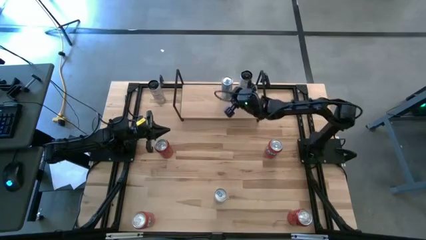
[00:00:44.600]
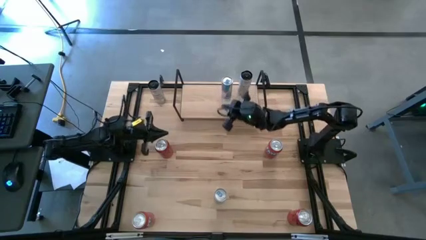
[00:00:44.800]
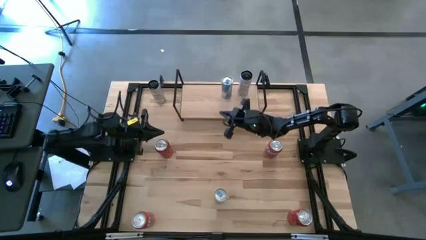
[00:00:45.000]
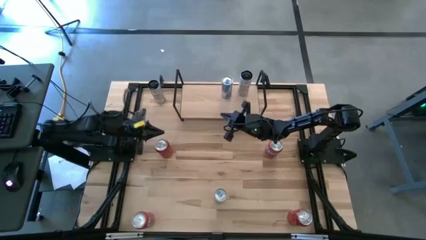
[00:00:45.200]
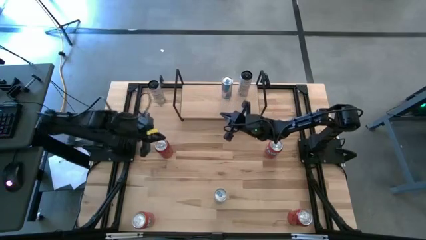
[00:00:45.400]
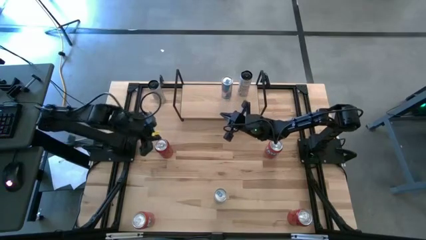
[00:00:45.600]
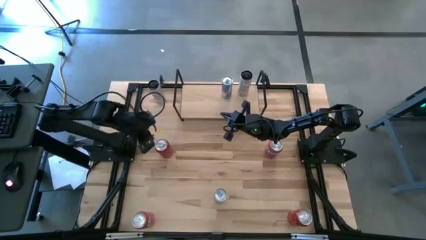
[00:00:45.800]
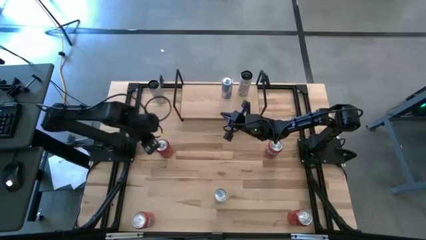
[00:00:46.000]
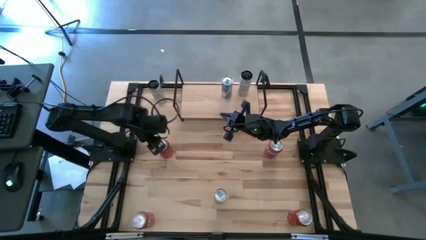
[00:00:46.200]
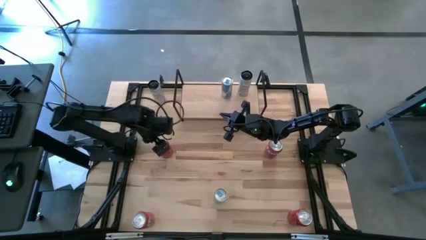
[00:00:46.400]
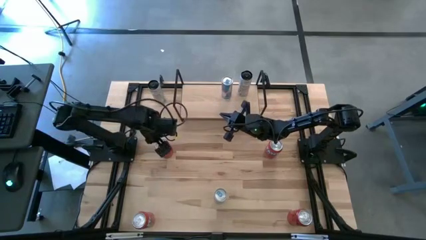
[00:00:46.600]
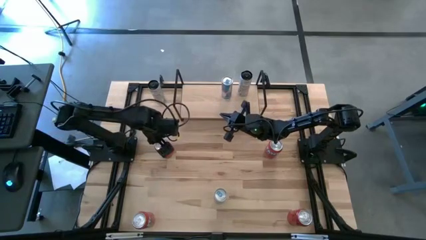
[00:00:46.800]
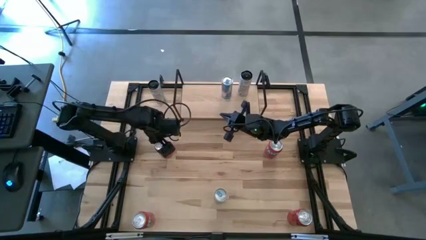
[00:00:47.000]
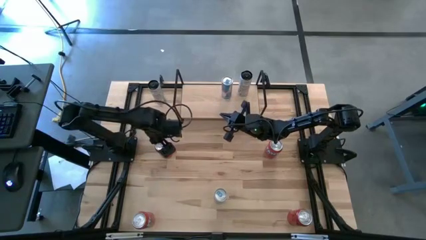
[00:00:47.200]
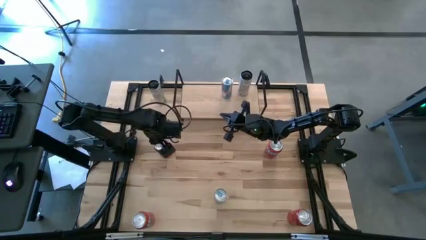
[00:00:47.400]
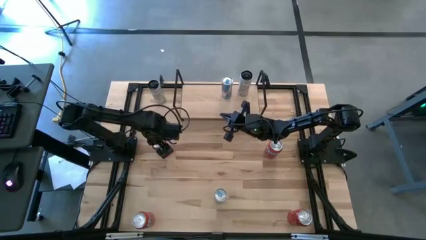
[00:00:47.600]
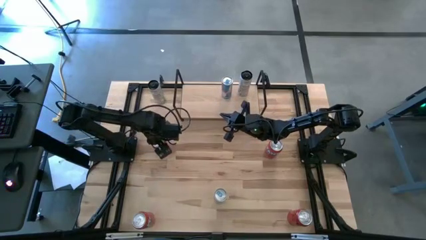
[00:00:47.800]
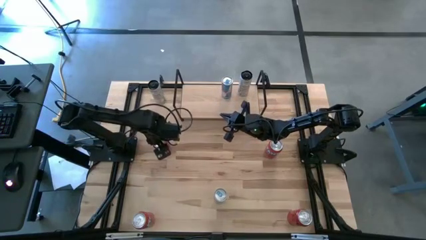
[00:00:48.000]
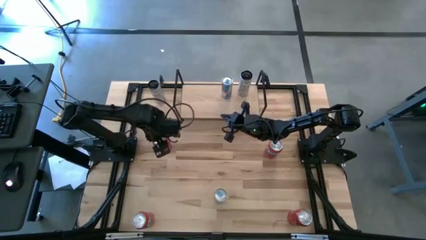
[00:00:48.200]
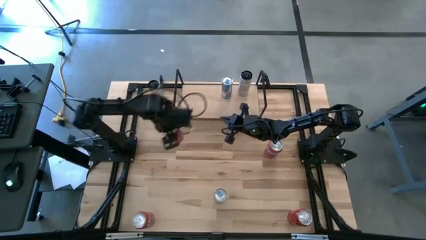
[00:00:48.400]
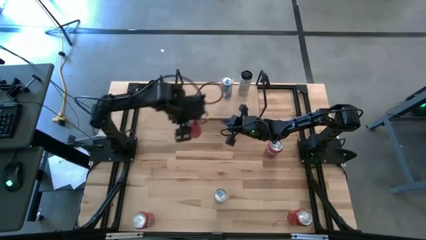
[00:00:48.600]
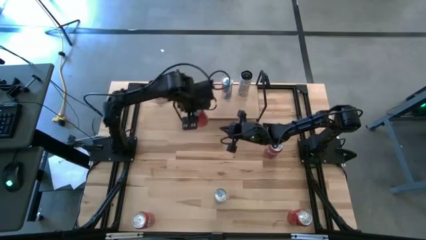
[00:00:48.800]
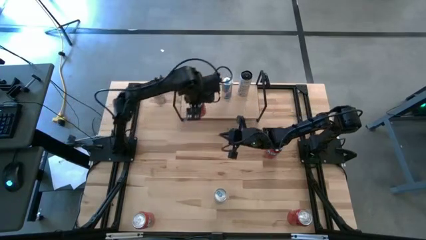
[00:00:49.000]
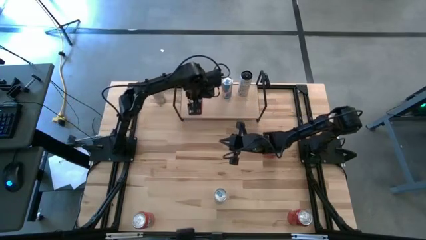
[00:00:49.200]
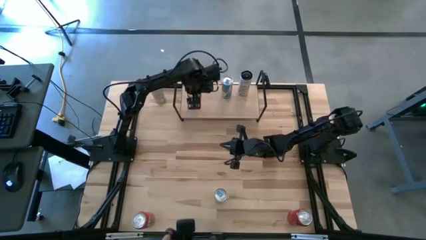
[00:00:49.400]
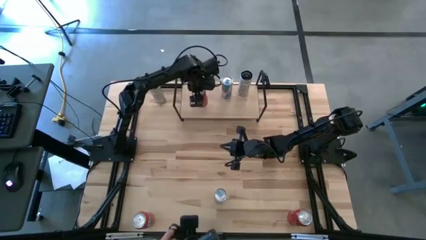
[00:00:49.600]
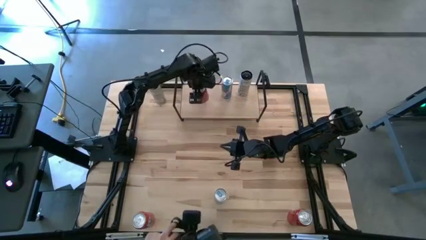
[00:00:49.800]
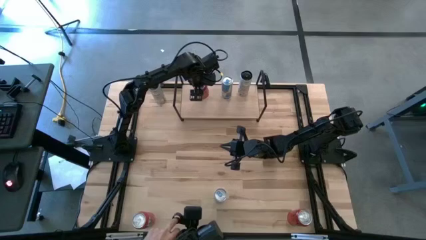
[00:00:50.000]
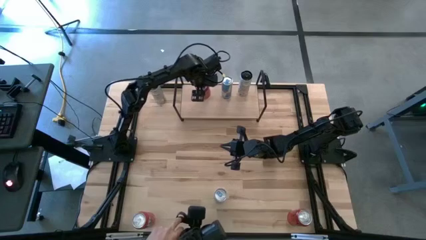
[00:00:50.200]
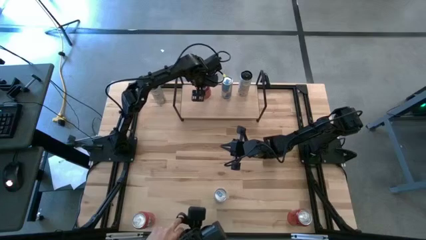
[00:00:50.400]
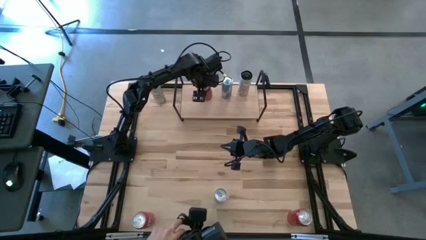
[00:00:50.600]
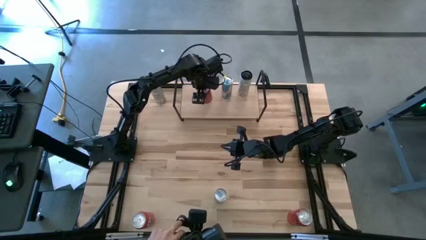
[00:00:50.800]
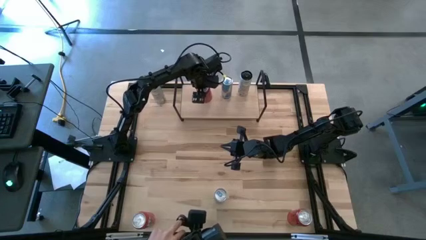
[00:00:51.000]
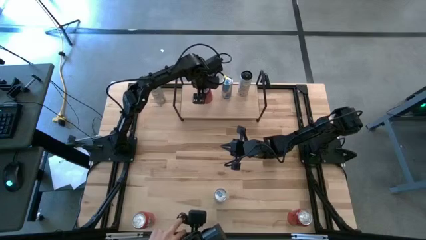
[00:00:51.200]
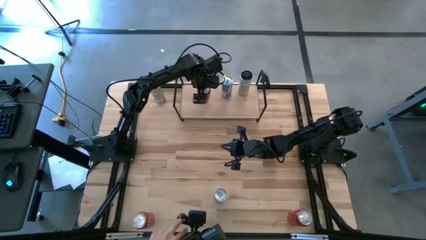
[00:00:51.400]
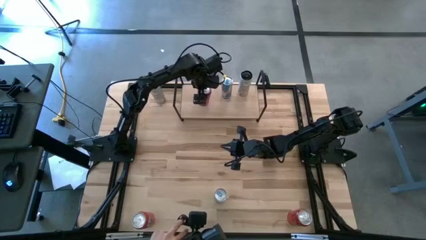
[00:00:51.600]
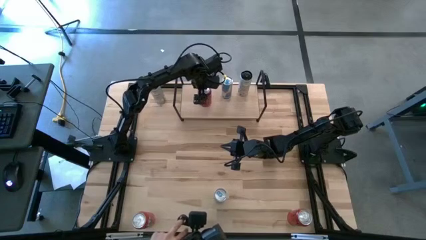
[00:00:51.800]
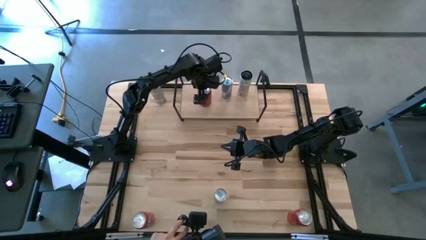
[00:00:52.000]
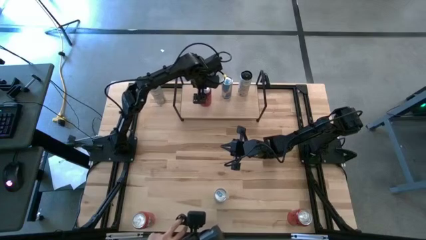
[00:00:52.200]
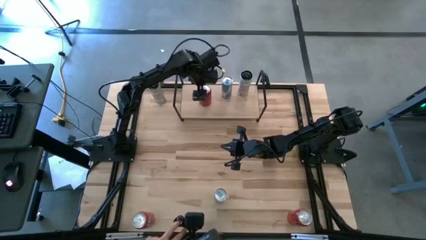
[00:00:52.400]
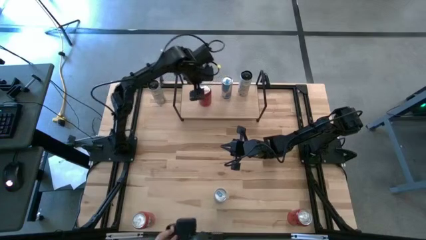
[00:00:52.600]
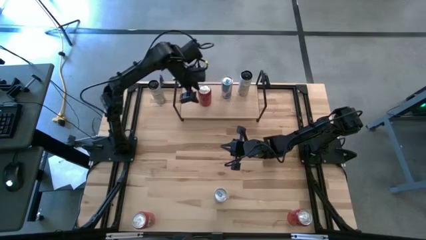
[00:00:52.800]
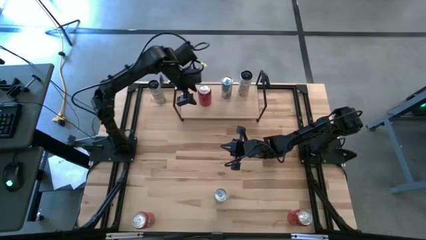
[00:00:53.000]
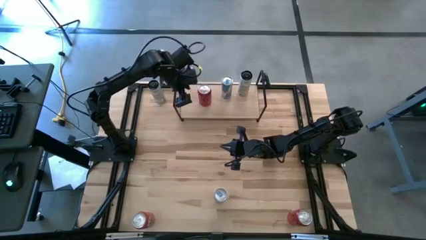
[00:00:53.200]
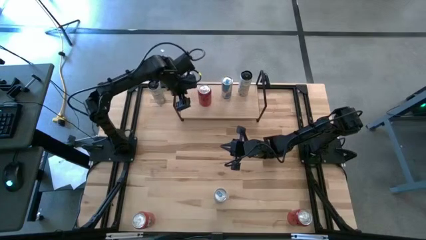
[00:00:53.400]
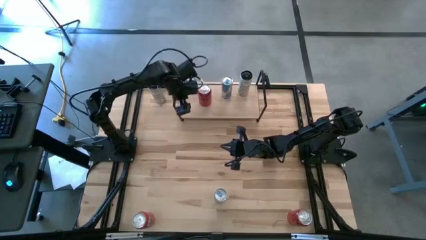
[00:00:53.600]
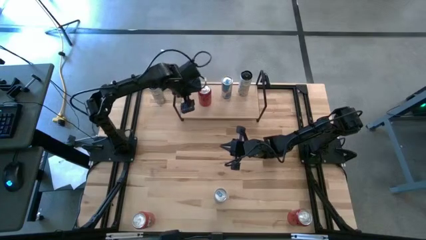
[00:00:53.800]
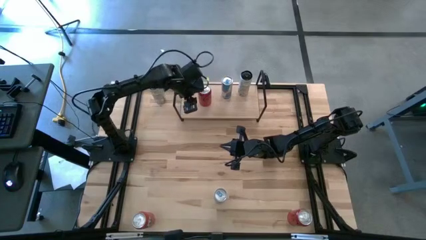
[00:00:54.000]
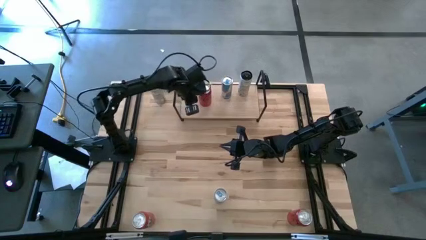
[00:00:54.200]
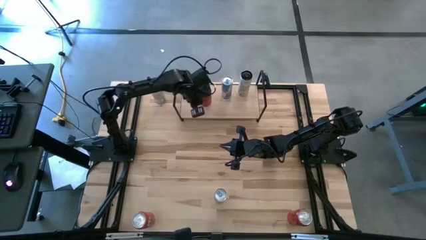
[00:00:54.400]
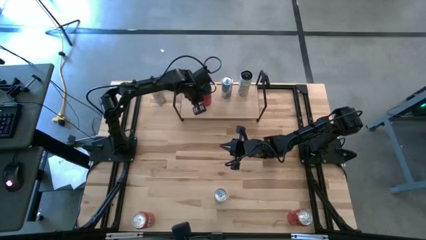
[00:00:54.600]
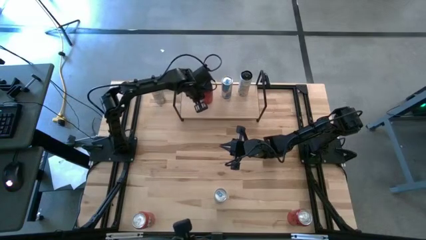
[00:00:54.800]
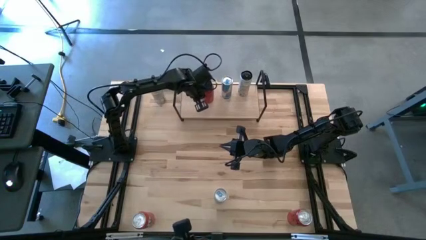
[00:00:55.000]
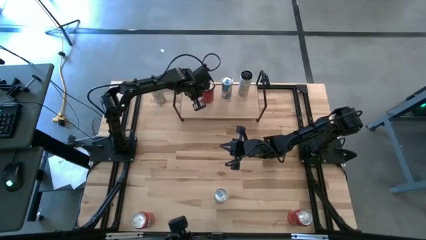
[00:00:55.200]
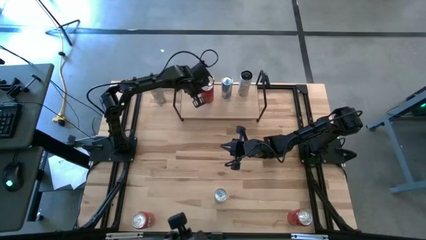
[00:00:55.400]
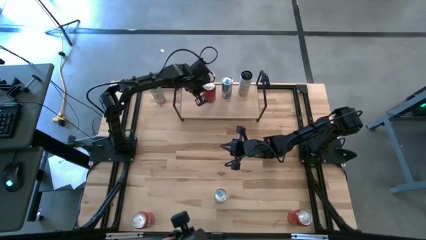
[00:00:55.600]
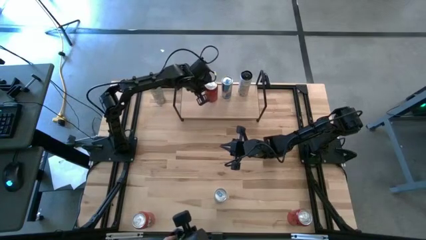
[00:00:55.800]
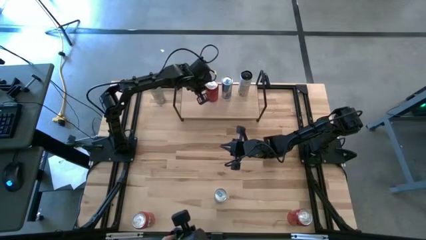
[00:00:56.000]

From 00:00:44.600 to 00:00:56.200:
Task: Place canned beverage on shelf
Put the left red black soda can on the shelf

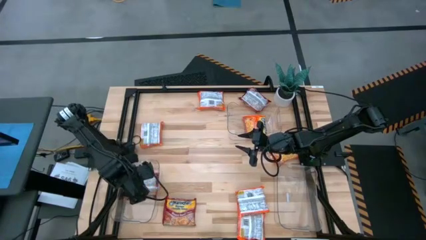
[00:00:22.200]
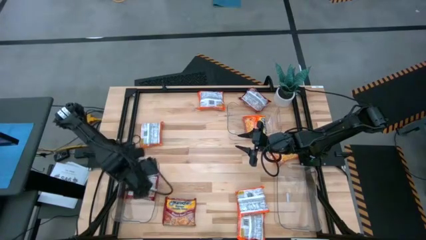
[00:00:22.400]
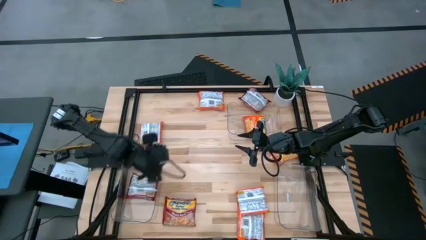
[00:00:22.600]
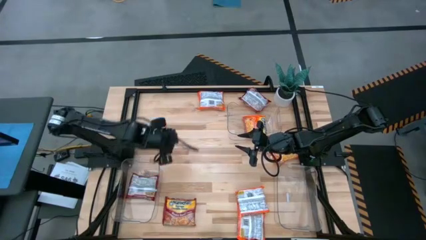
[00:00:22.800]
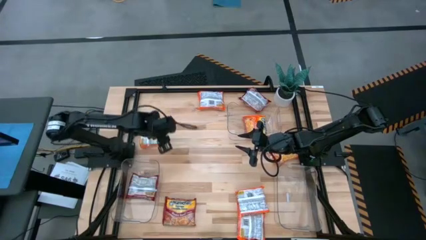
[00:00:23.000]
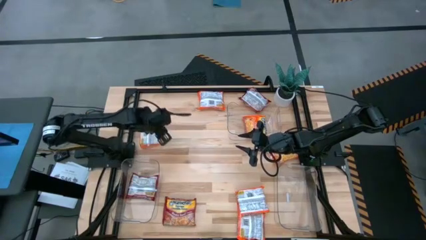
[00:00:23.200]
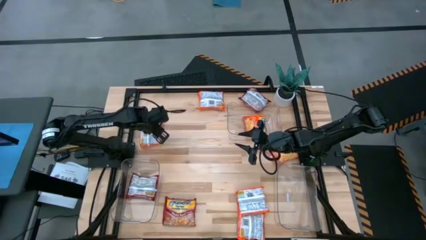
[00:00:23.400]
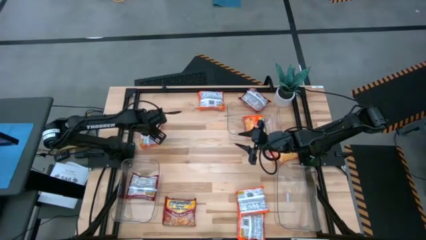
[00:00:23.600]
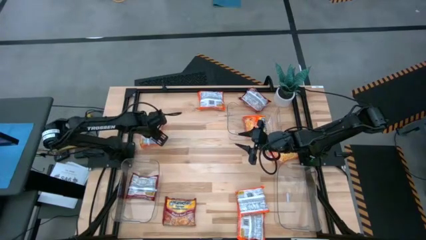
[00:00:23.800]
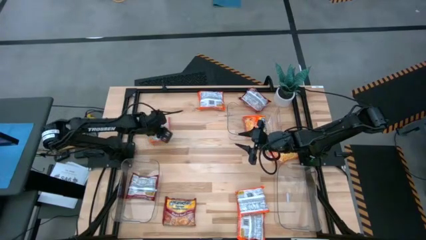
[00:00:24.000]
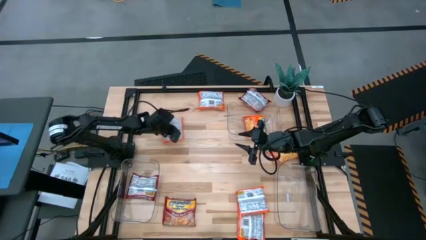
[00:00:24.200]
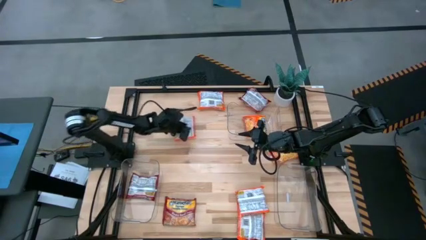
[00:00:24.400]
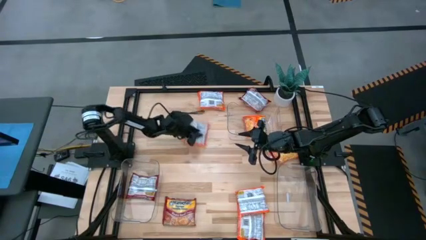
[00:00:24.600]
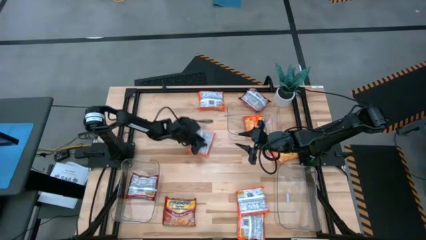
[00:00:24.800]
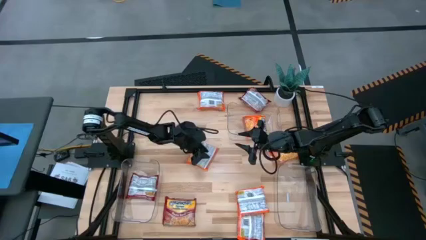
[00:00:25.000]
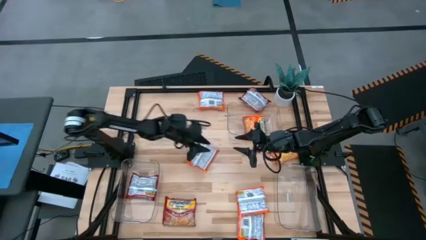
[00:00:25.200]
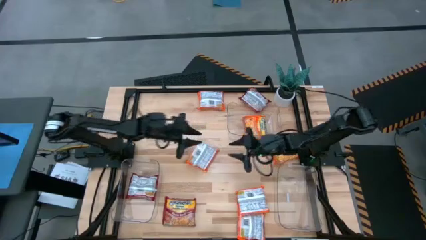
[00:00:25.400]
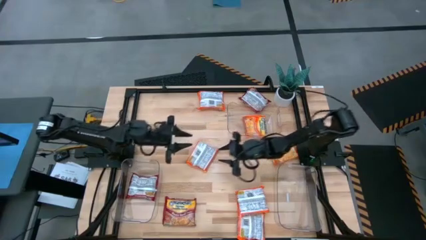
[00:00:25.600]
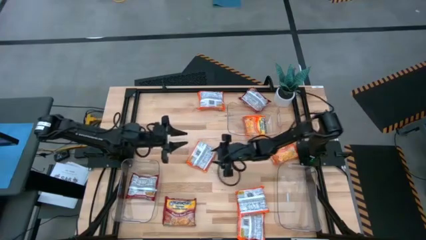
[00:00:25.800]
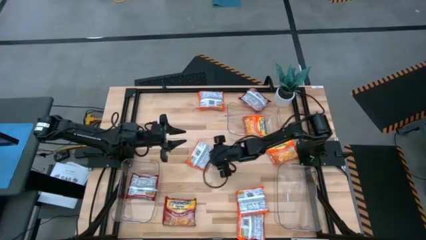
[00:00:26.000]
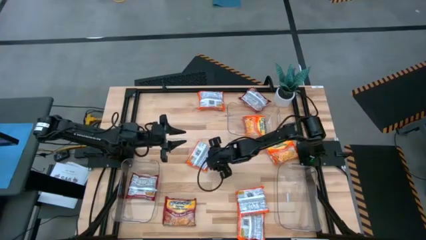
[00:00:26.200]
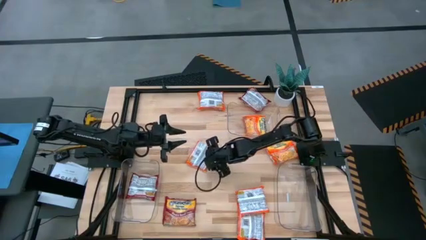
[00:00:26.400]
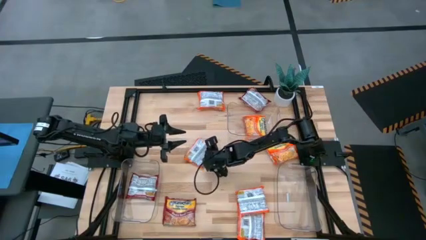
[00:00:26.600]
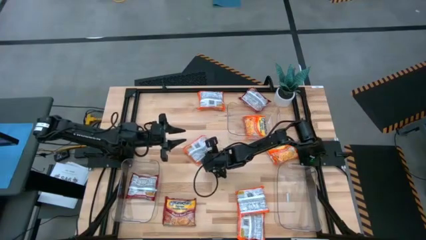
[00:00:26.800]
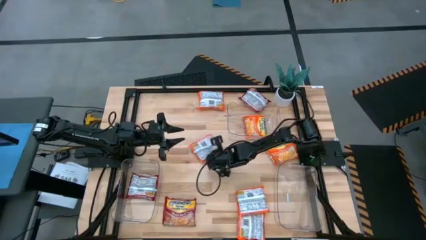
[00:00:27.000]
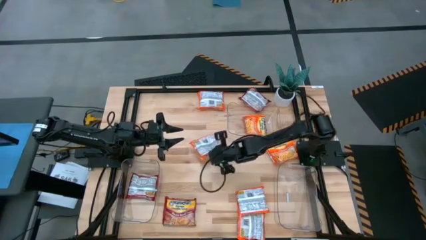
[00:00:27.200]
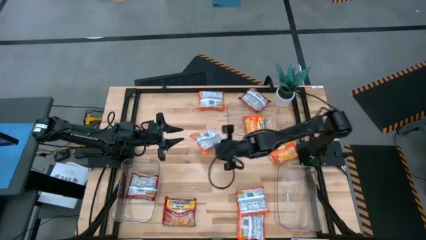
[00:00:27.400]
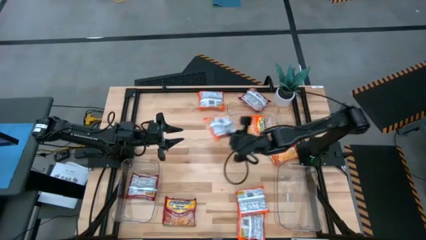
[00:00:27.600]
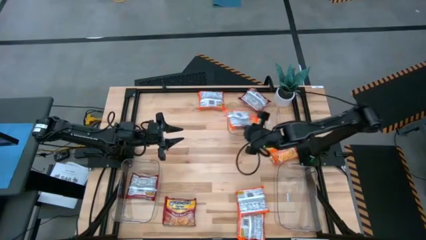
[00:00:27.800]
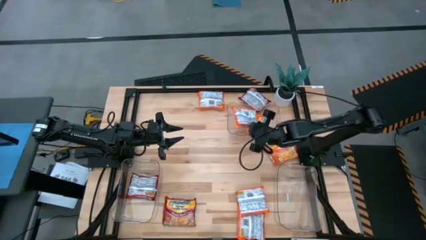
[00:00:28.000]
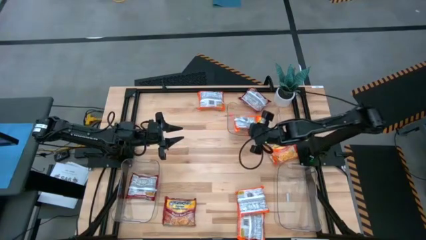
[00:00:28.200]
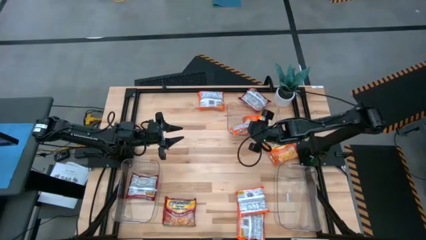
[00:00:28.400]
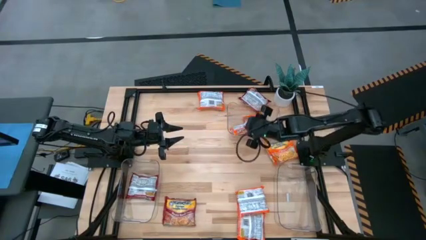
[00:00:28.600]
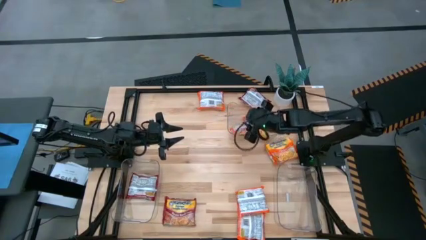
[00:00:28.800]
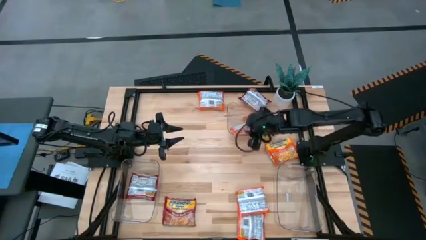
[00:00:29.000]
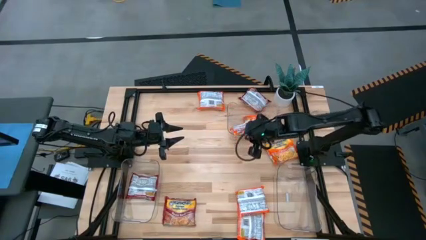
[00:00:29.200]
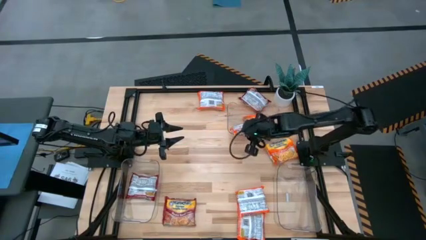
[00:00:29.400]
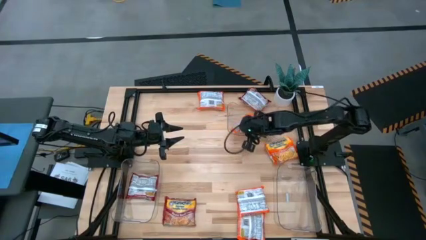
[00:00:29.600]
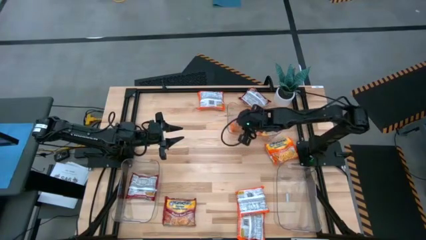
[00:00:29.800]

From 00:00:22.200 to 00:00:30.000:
Task: Sort Maruchan noodles
Put the orange noodle pack into the top transparent bin
